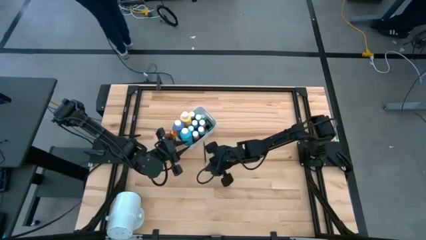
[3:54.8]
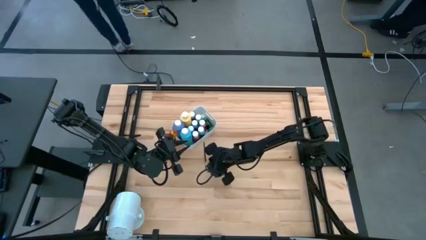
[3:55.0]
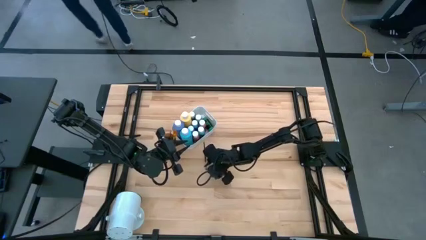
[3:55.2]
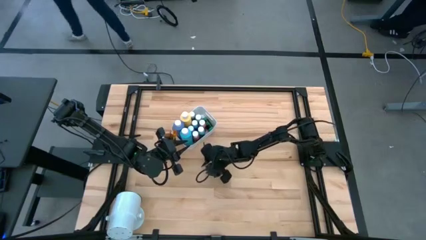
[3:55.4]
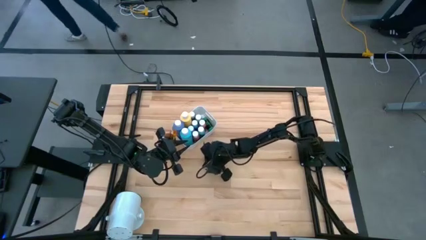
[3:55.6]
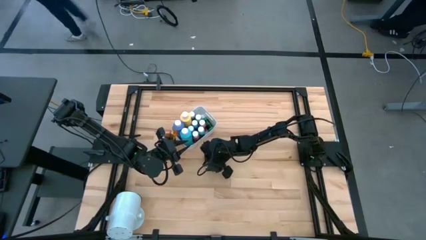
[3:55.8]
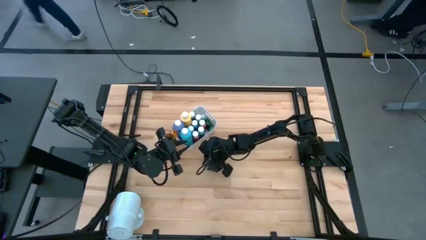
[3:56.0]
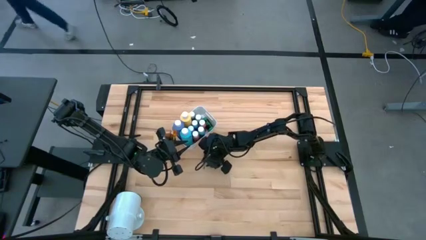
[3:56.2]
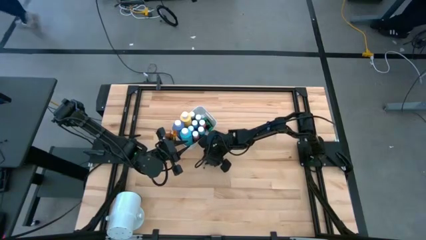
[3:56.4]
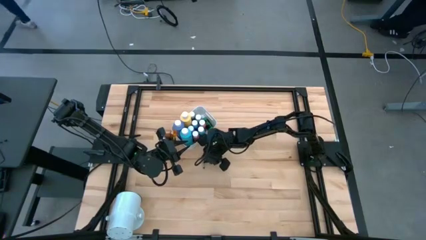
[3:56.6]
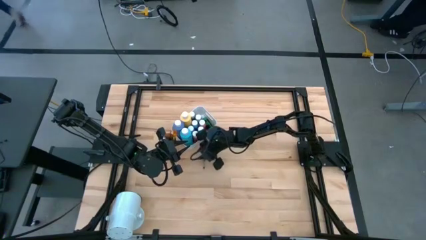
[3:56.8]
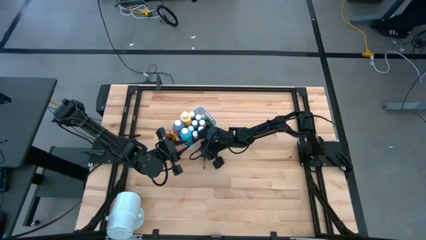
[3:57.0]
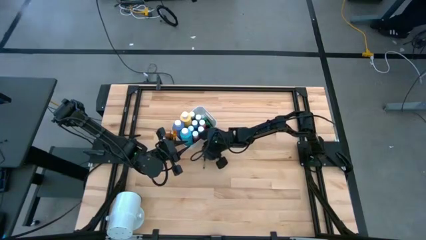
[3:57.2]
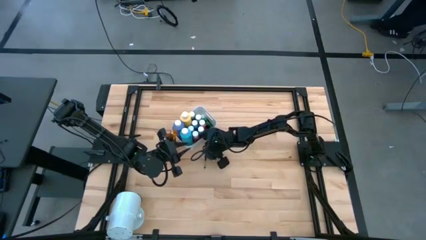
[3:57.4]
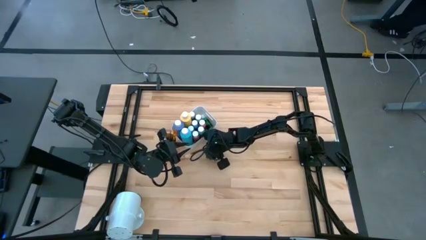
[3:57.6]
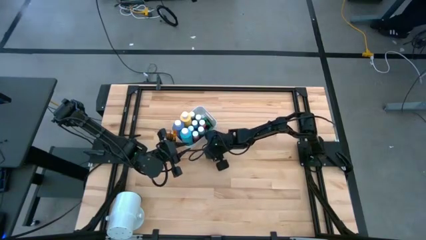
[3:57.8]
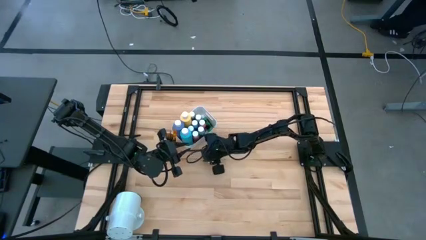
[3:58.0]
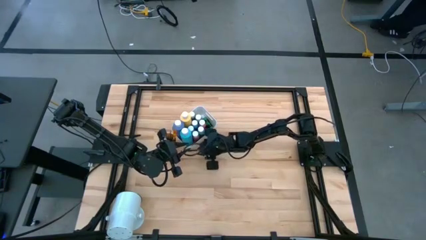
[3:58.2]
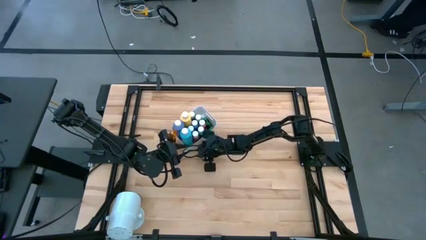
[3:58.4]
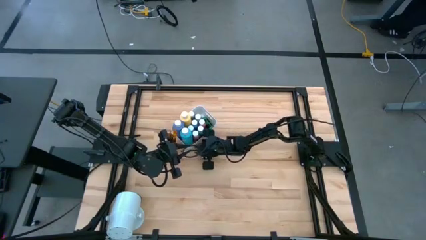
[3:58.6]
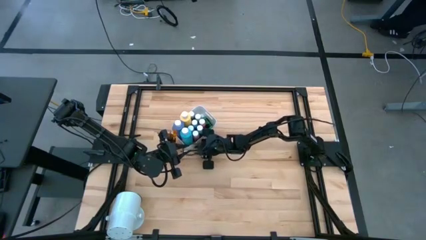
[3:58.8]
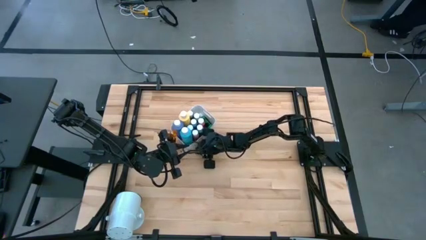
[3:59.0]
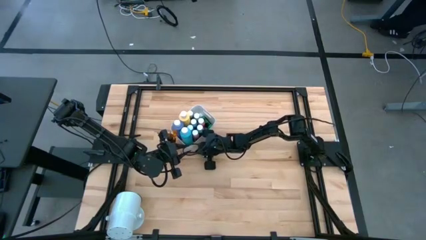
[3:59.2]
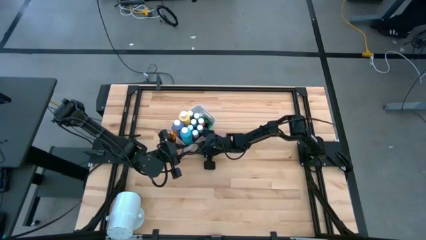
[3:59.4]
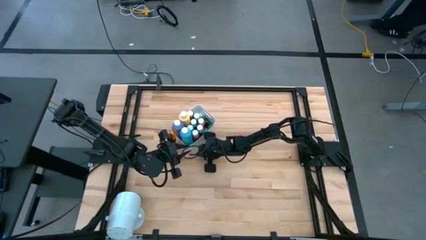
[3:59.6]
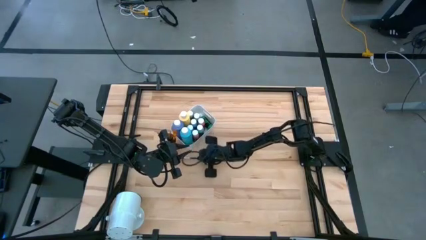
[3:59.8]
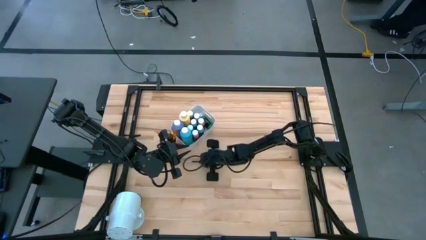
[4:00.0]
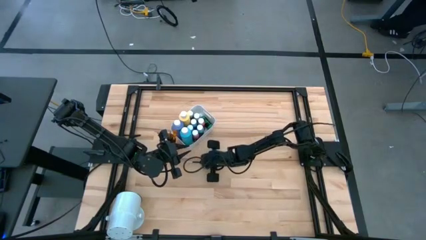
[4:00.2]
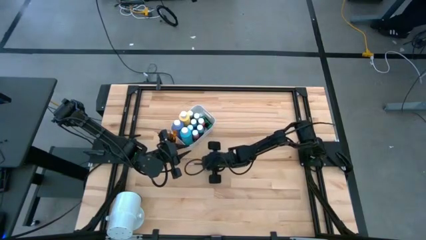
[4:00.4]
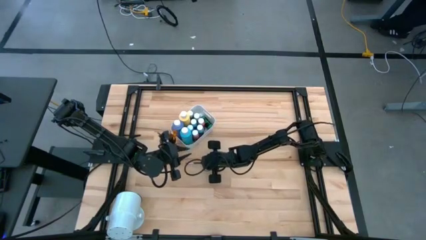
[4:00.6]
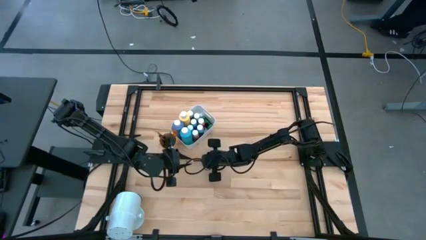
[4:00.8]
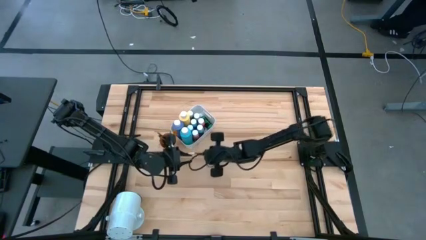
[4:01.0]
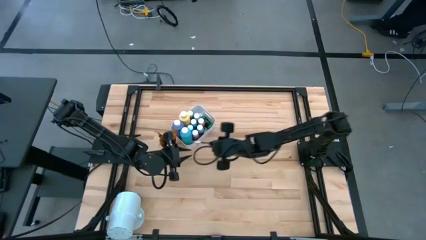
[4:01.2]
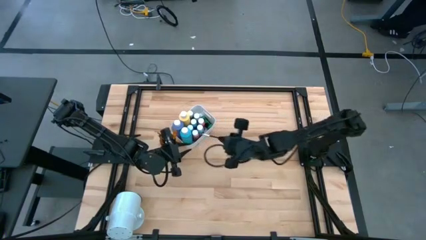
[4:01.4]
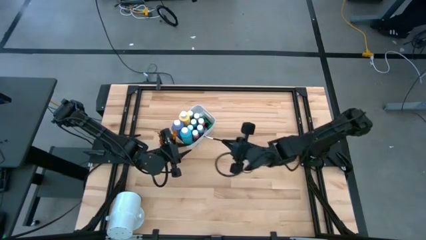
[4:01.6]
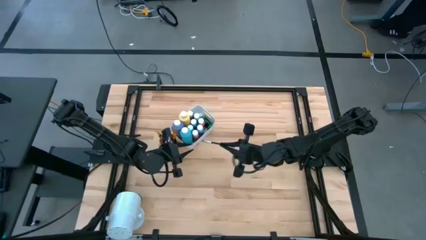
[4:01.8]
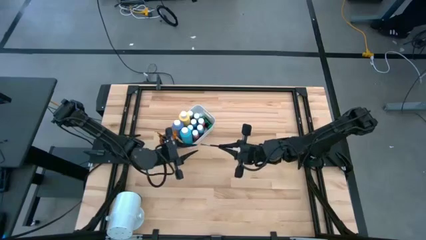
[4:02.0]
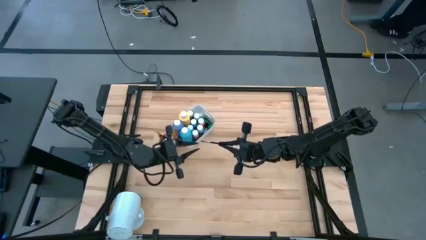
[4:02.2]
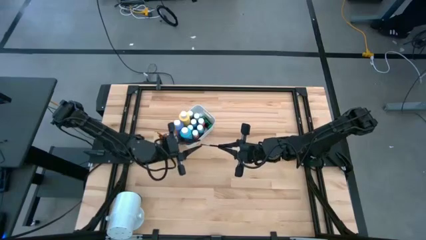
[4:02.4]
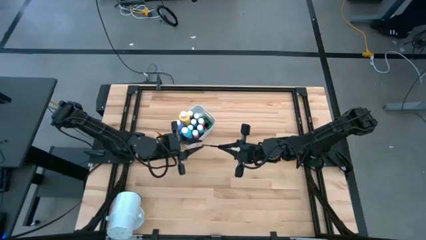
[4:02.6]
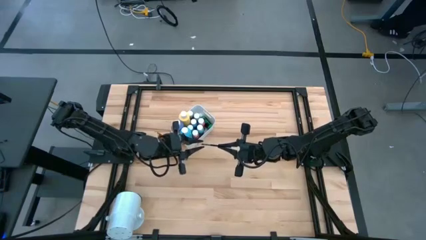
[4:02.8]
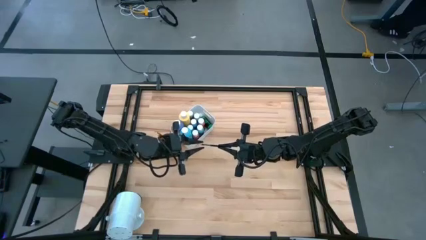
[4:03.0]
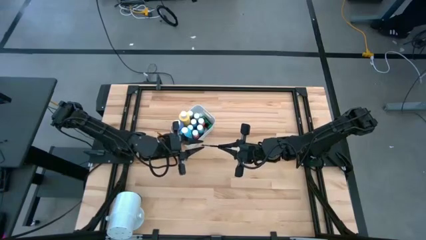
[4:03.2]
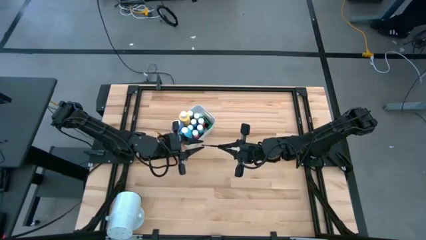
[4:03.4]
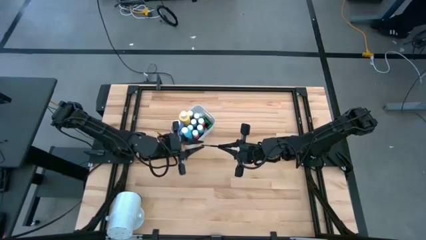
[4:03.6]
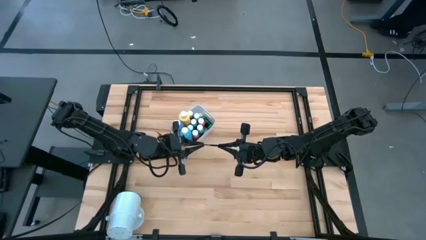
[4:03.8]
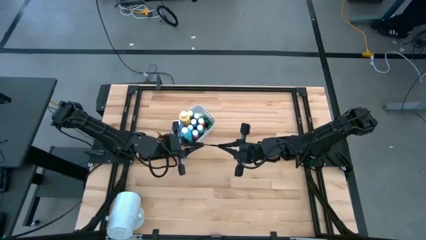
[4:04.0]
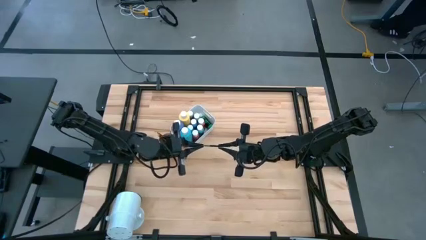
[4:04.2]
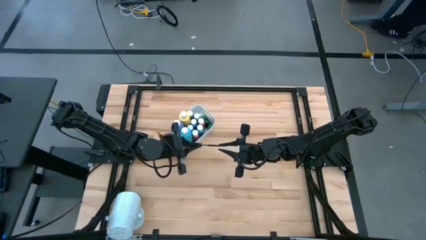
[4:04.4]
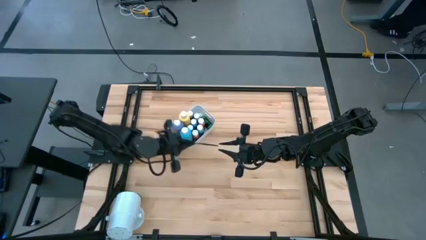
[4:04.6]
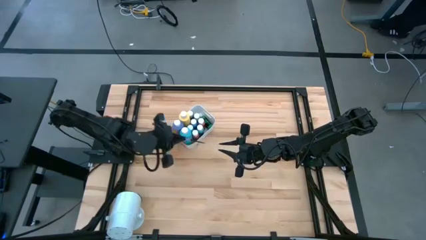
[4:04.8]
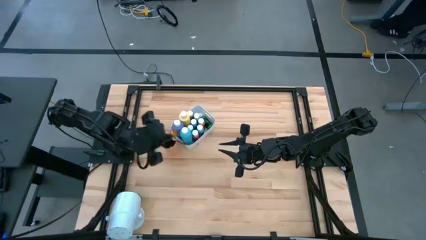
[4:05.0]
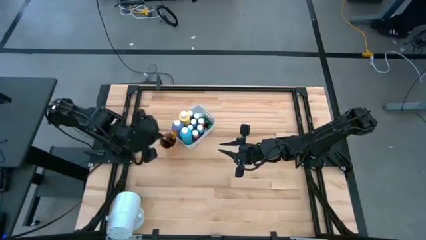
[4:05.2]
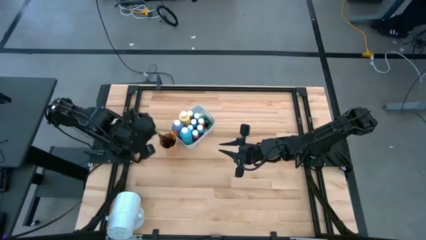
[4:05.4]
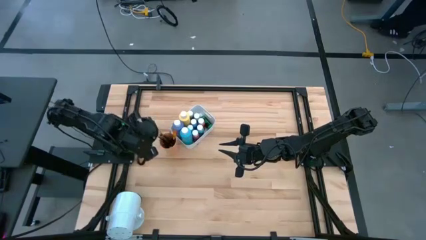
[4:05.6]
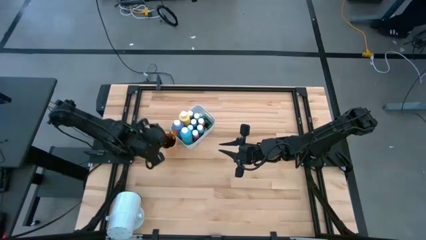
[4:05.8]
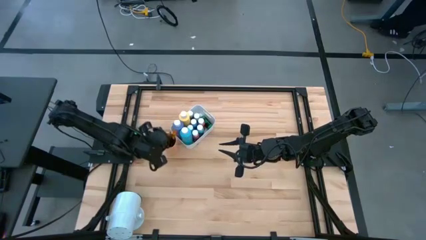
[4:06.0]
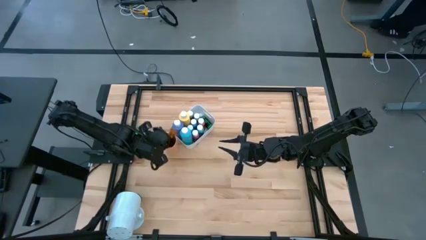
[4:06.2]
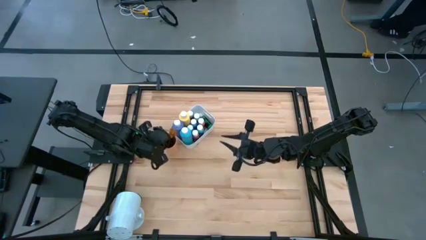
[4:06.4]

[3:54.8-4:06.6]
Task: Pick & Place Paint Supplies
Put the black silver paintbrush into the orange cup
